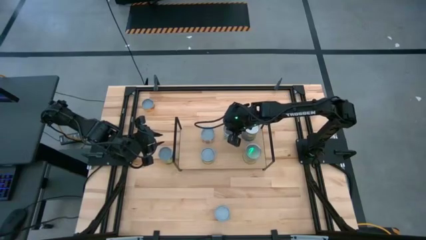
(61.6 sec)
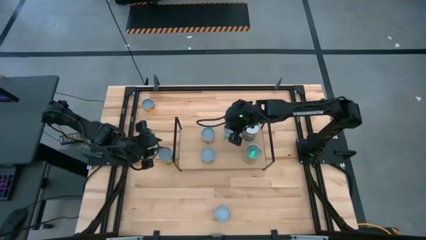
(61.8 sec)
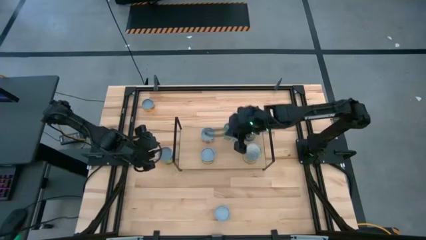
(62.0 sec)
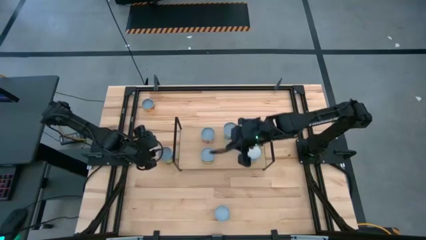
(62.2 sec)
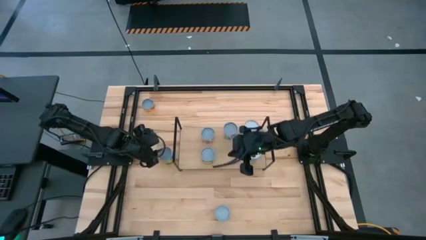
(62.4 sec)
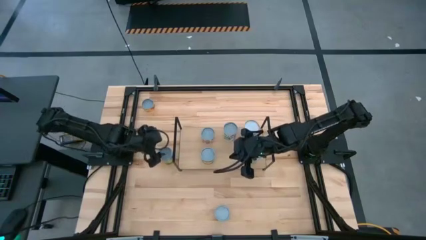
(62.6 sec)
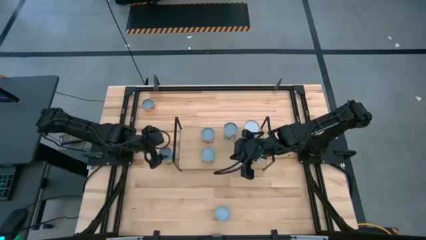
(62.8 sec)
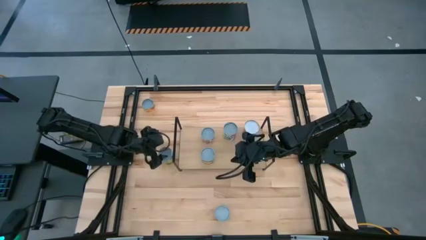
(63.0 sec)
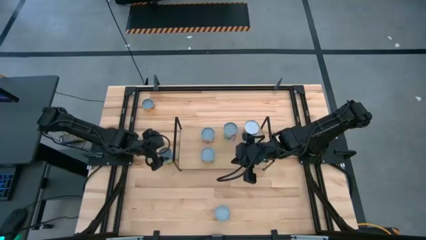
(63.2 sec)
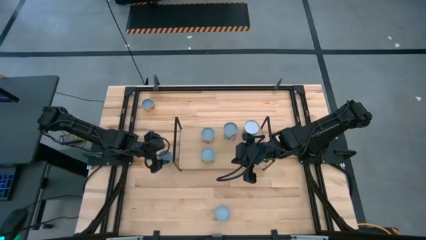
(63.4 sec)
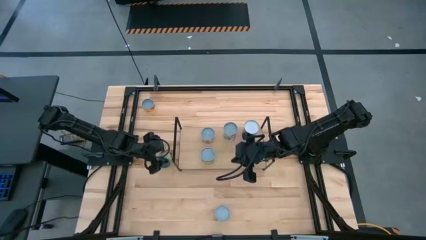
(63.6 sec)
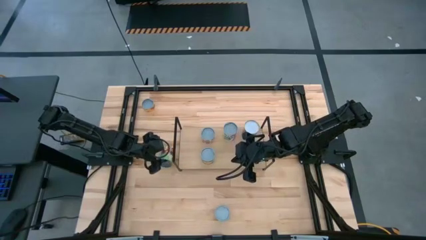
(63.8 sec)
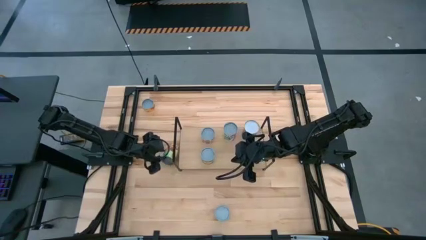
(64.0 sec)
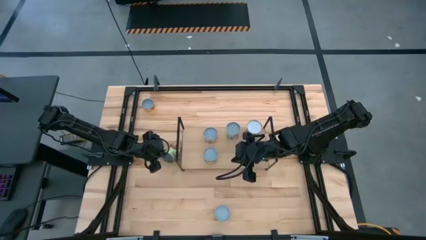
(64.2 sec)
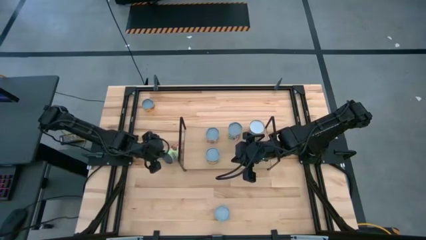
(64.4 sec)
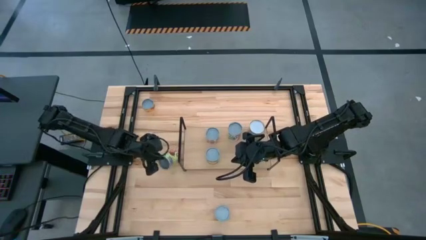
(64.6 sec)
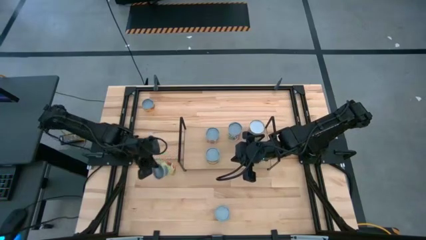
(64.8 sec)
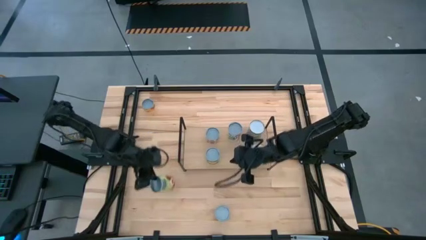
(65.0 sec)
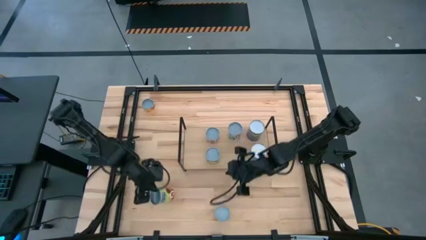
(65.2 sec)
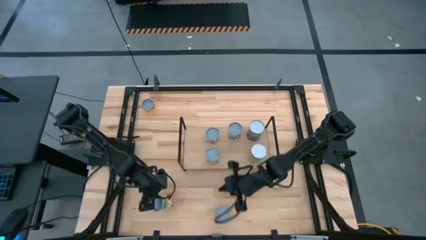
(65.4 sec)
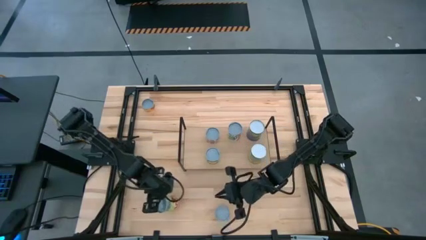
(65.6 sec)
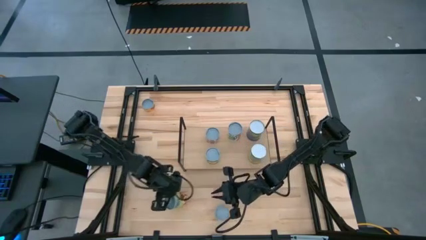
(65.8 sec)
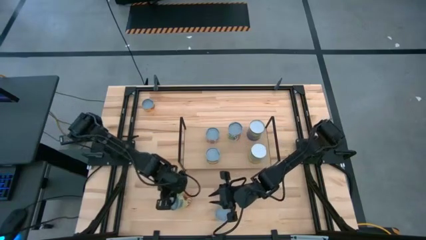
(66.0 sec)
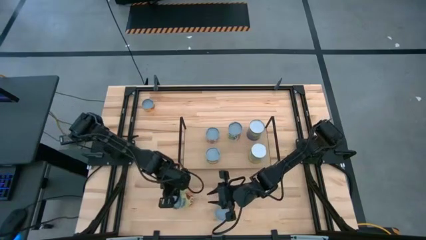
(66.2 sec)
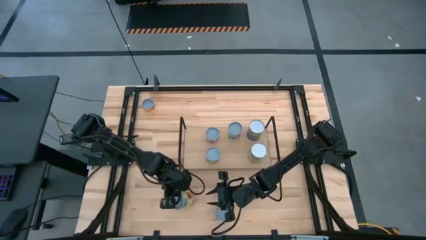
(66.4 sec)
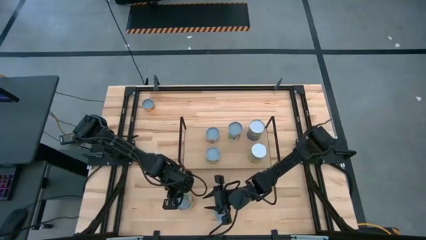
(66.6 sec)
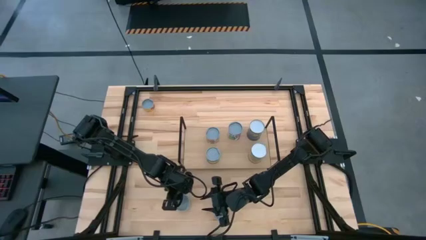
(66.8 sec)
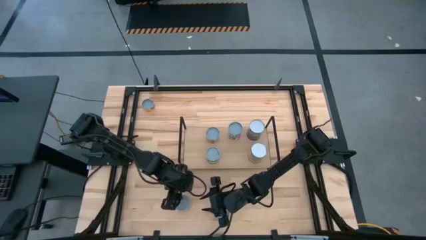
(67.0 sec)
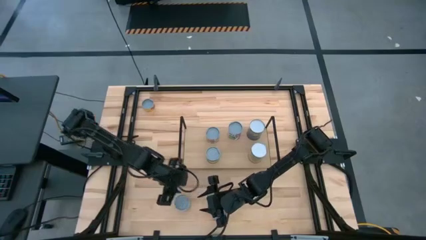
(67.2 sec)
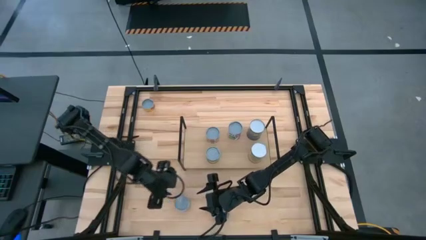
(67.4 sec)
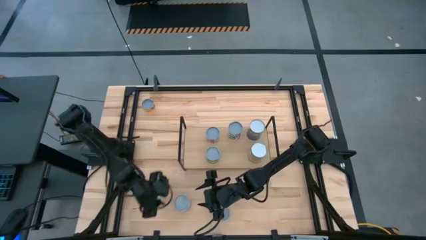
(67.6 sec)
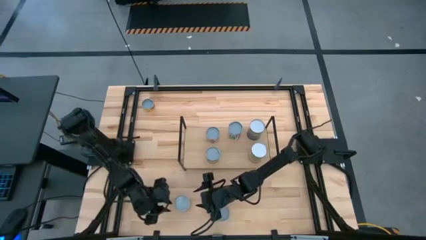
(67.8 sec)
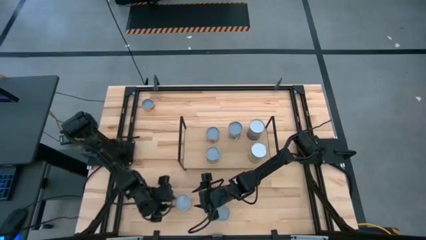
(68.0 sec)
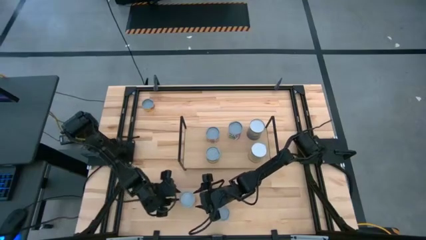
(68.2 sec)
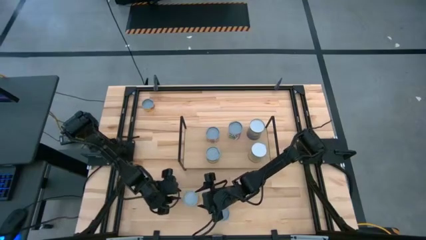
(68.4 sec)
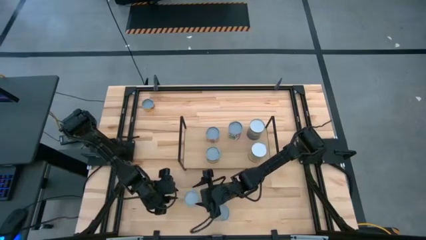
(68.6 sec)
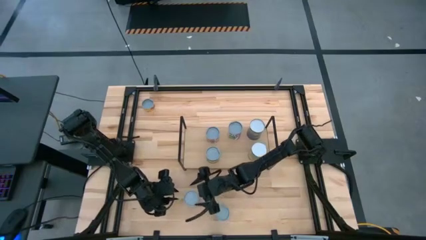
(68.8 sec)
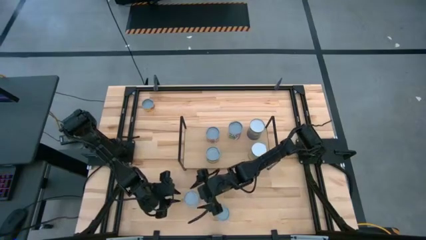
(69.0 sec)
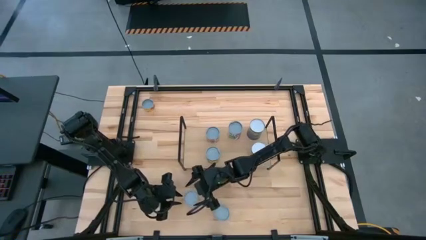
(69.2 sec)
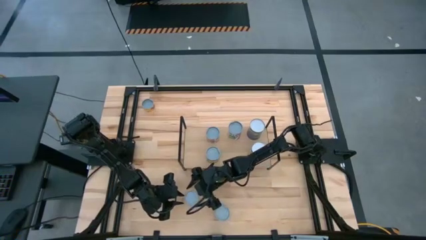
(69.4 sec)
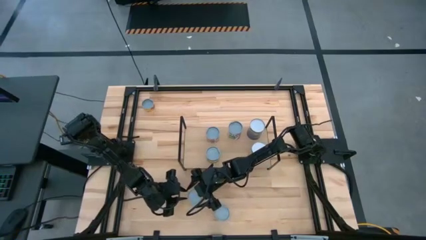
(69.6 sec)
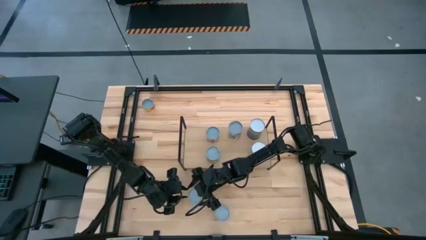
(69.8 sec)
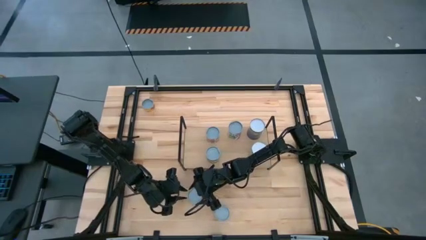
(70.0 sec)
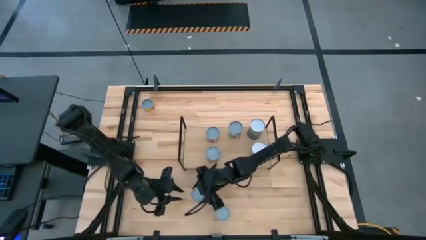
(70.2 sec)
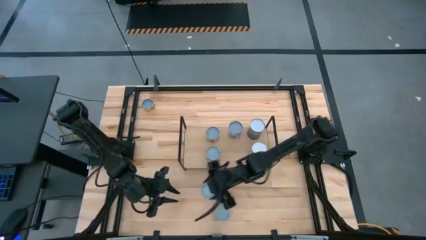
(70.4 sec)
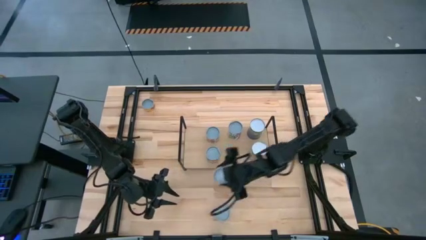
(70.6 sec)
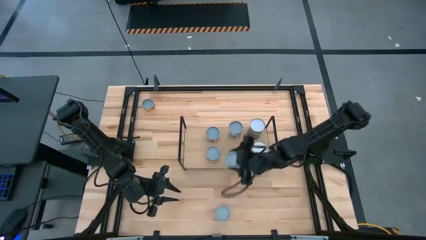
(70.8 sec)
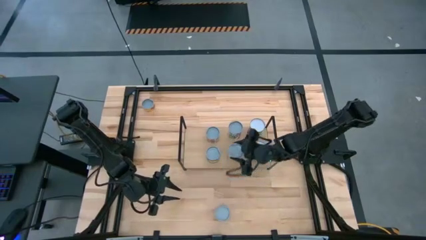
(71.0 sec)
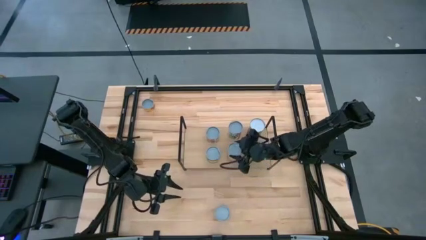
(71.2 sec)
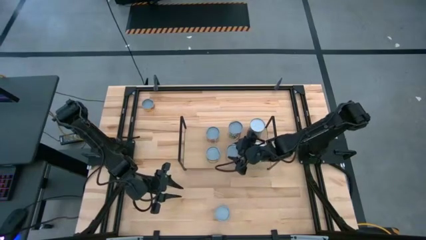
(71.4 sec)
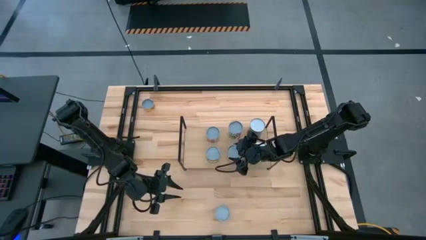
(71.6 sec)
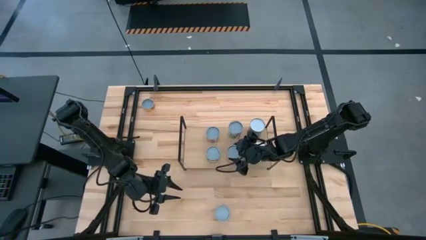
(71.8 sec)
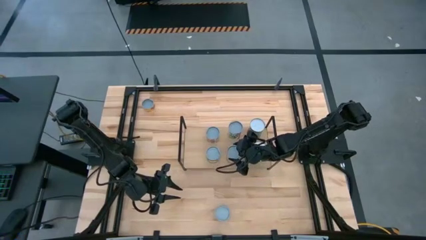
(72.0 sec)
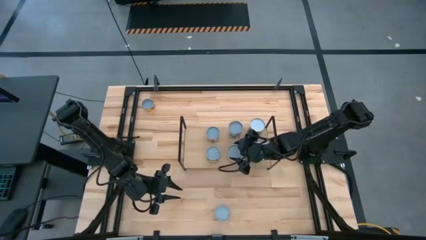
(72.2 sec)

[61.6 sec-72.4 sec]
Task: Pick and place cans onto a shelf
Put the canned spaghetti sauce on the shelf
